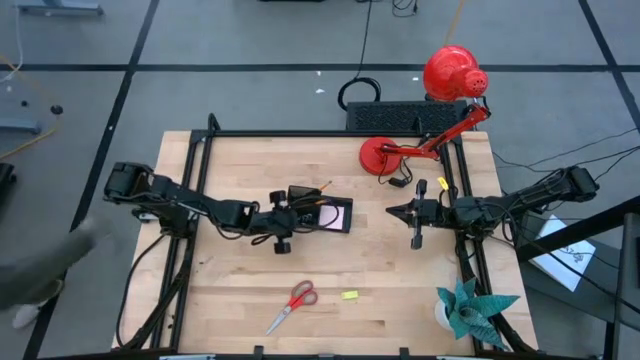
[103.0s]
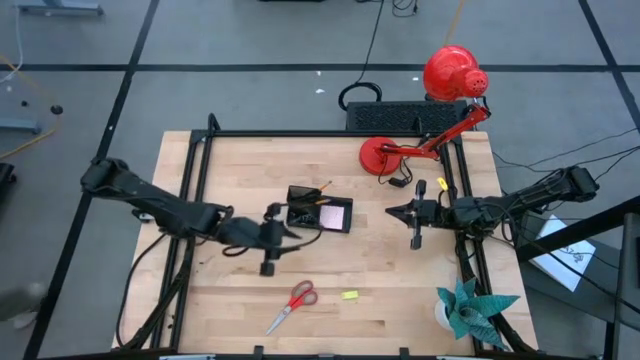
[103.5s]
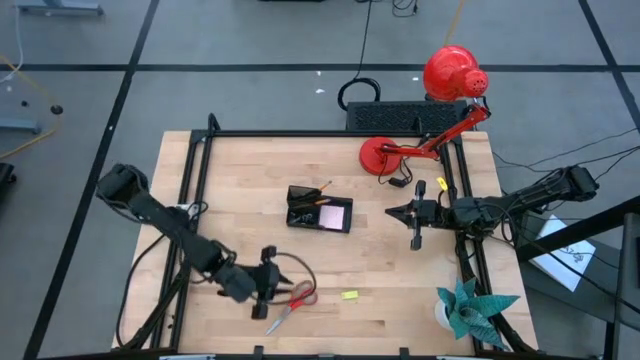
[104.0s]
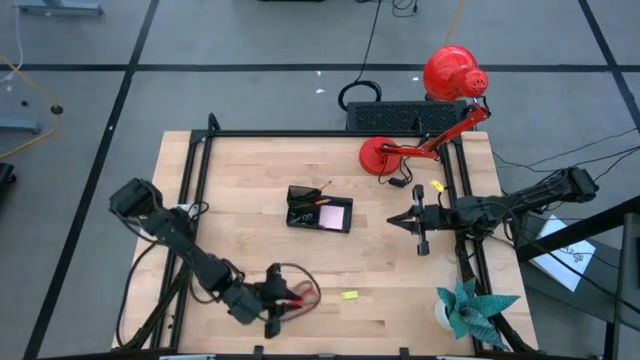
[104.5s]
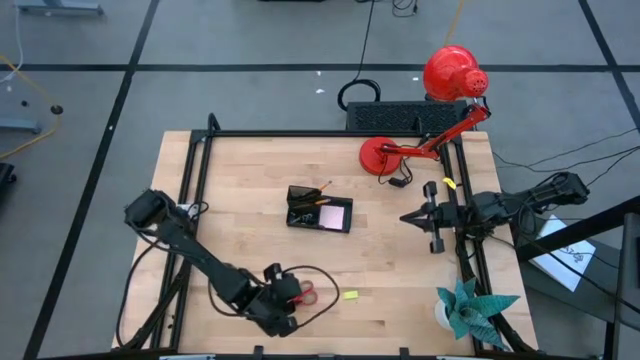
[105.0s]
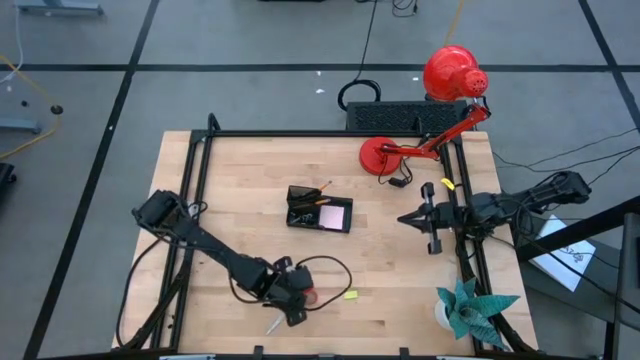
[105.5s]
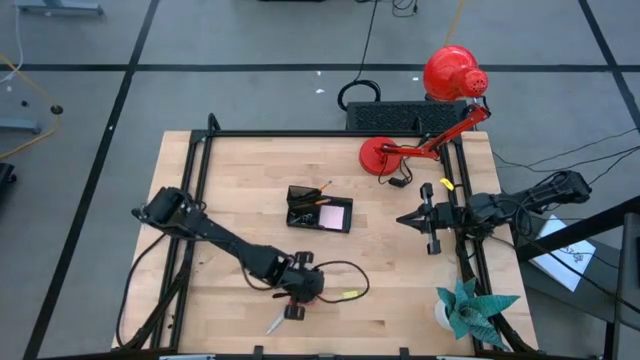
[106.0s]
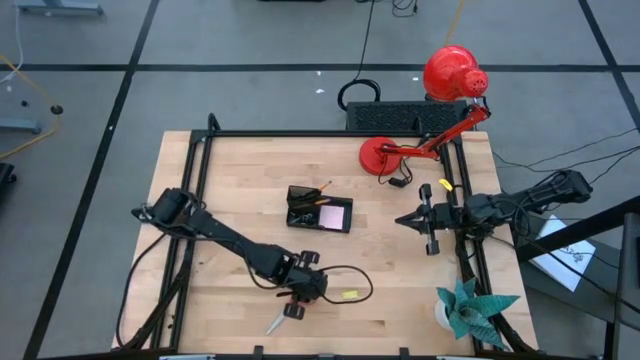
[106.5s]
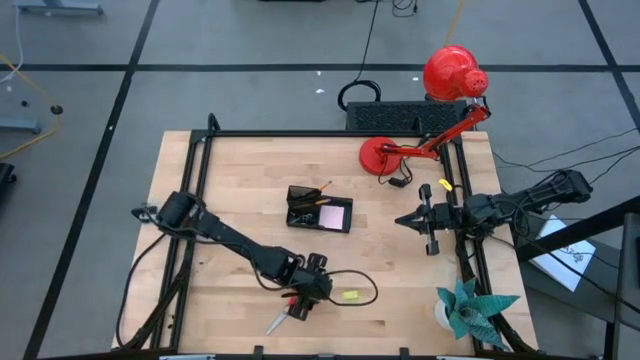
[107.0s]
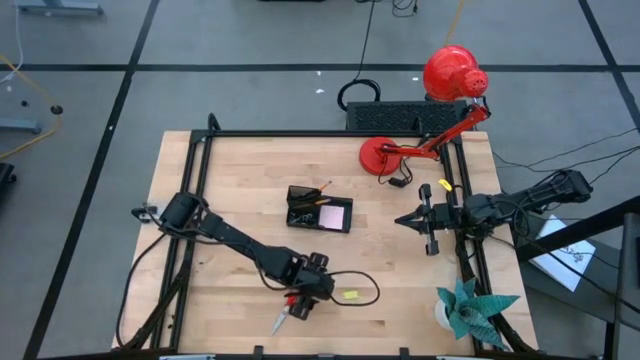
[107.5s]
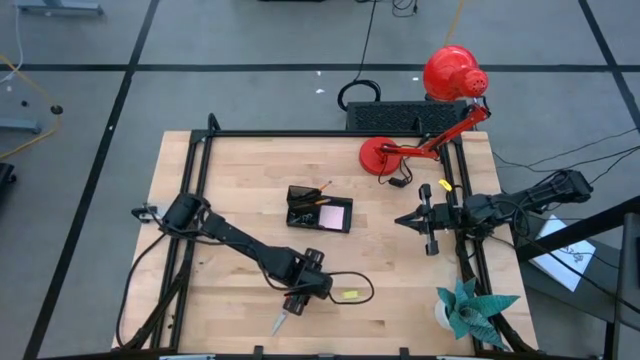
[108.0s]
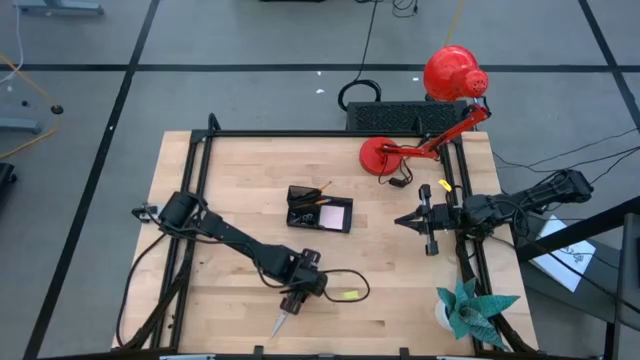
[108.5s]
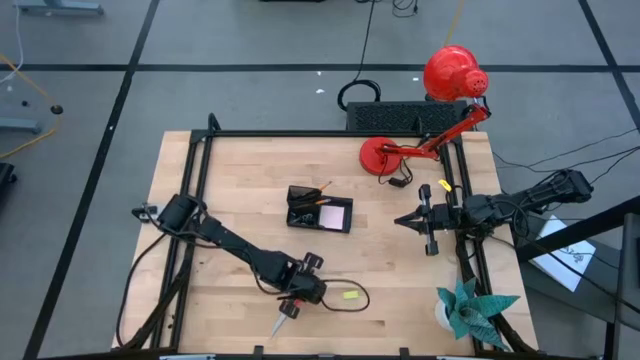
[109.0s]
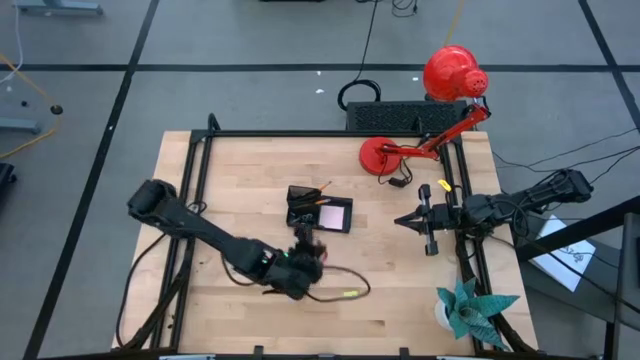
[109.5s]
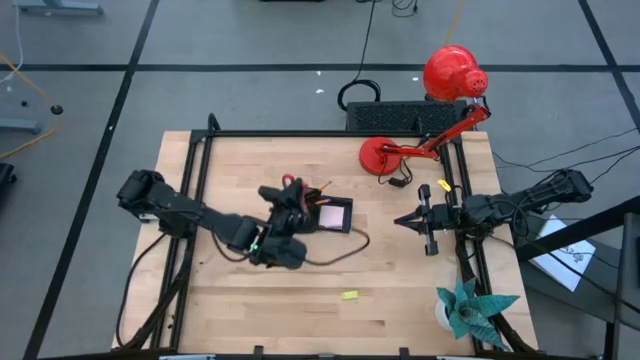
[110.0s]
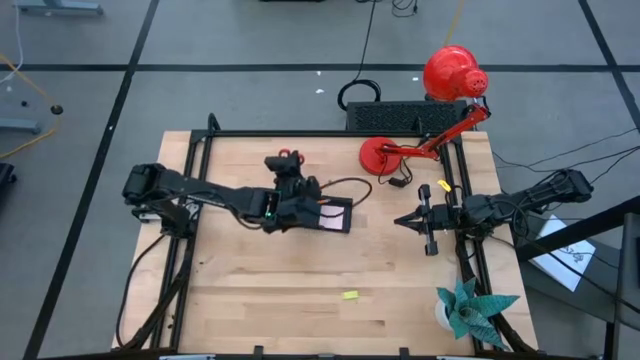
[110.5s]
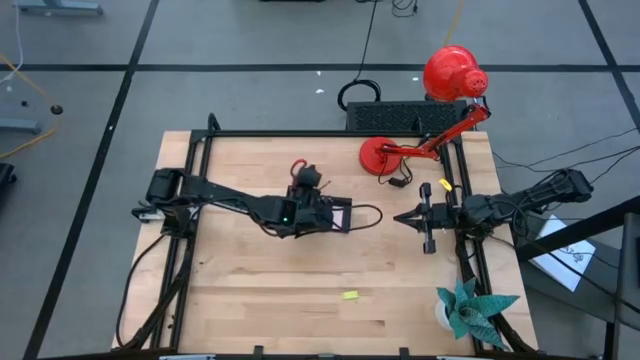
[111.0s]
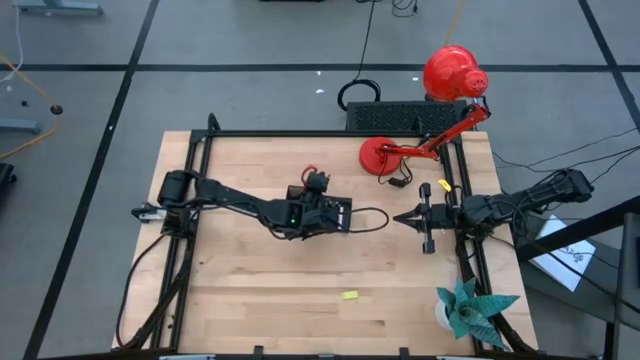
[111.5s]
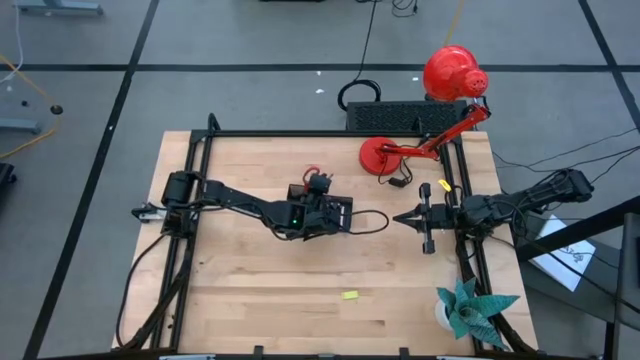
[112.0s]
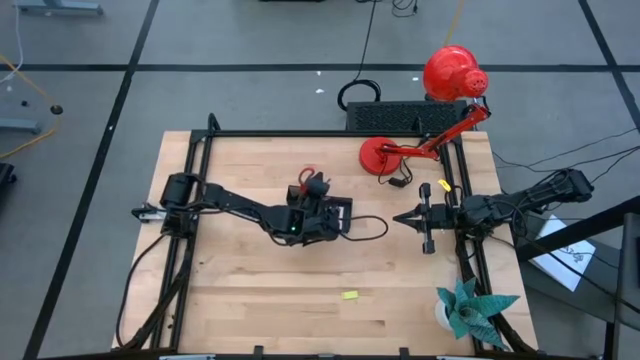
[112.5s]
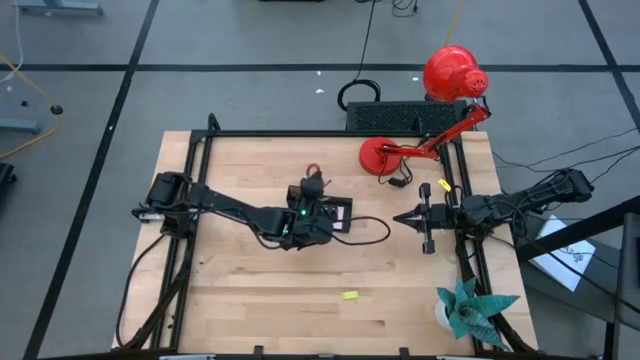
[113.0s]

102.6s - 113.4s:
Task: Pick and place office supplies into organizer
Put the red scissors into the black desk organizer

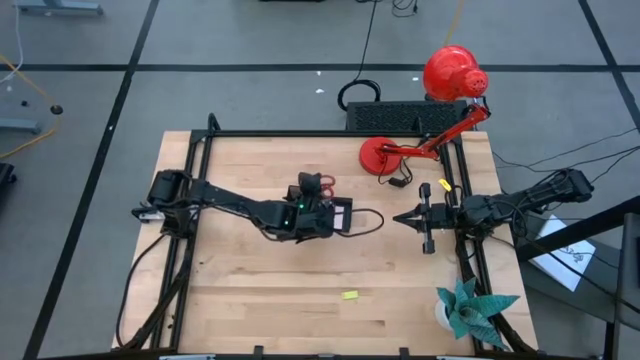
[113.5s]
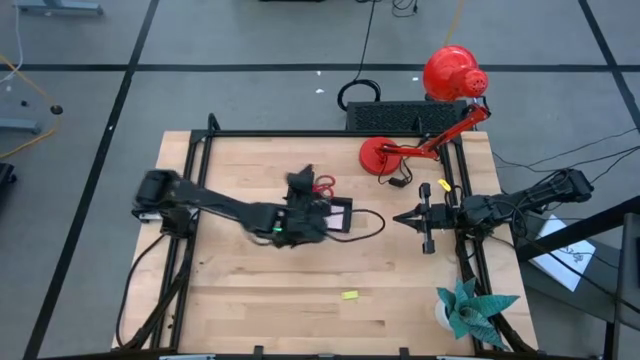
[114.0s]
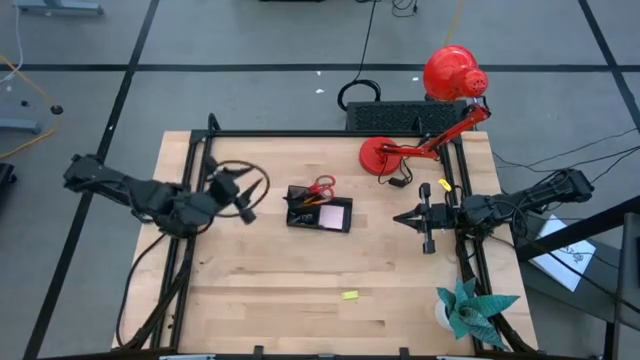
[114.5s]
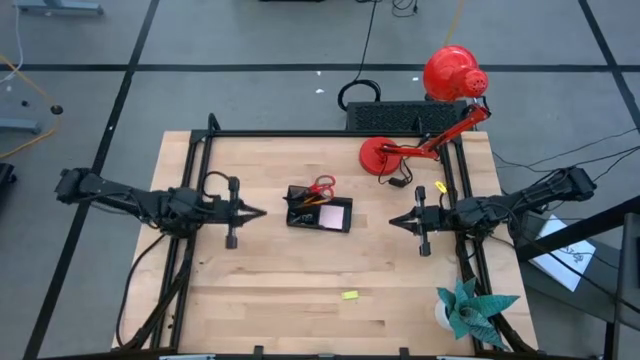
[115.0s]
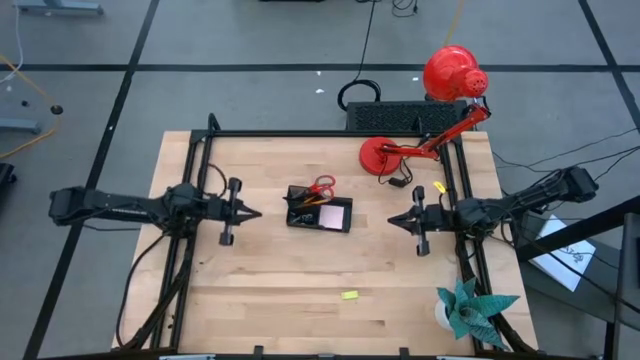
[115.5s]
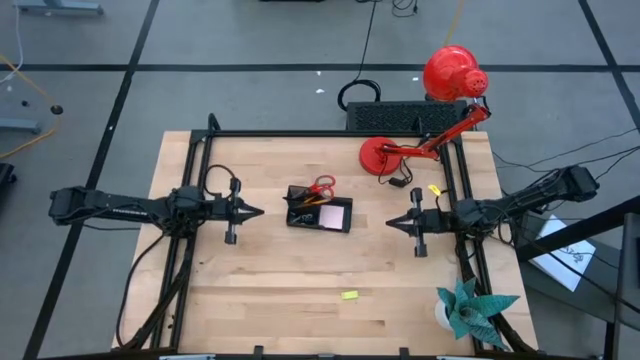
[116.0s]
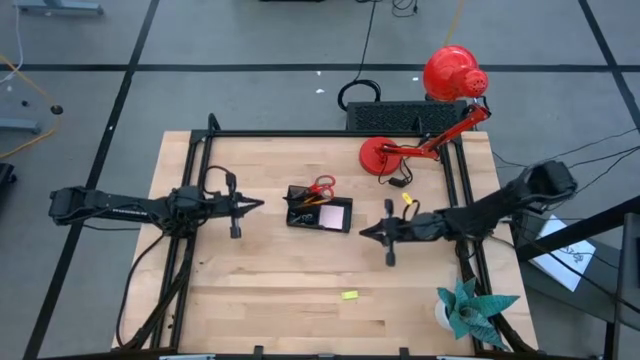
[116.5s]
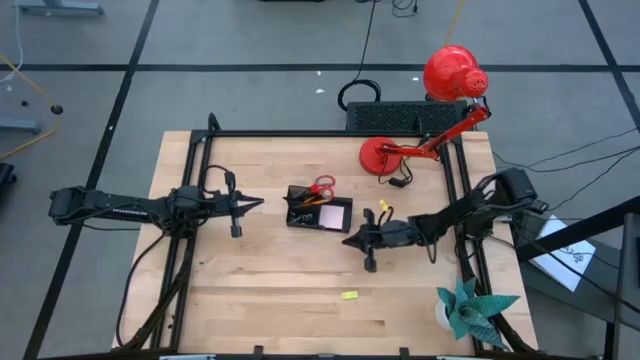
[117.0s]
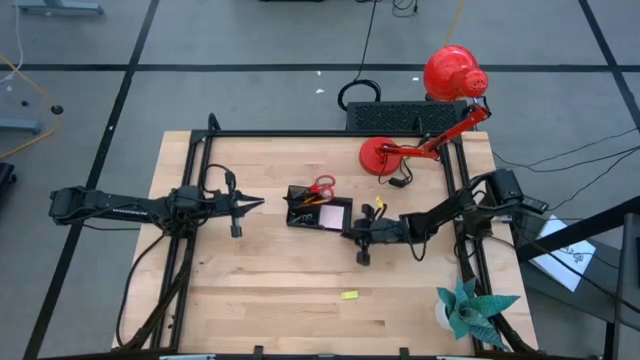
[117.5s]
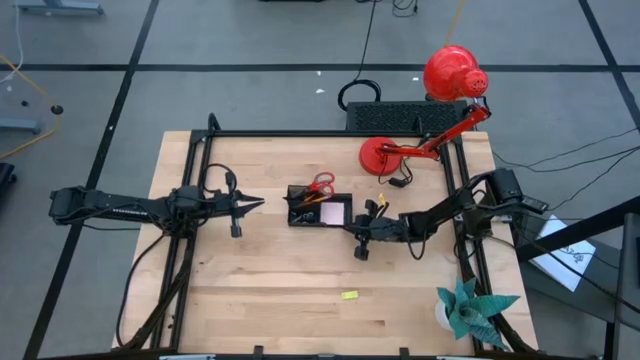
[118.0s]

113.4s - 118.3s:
Adjust the black desk organizer

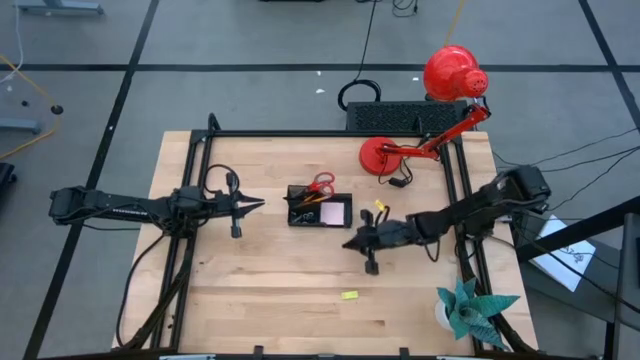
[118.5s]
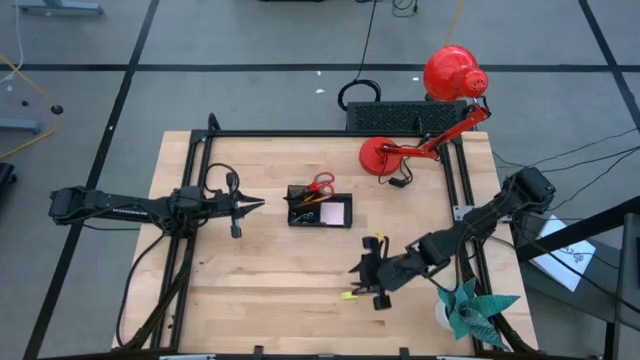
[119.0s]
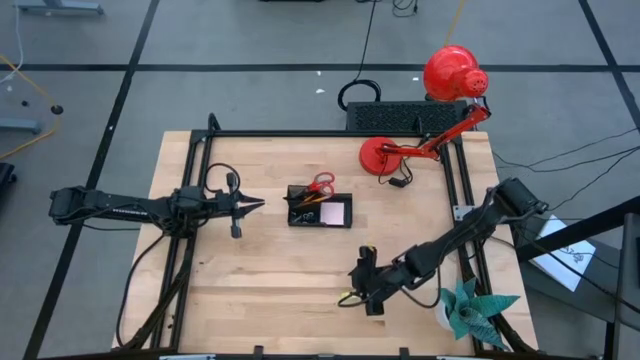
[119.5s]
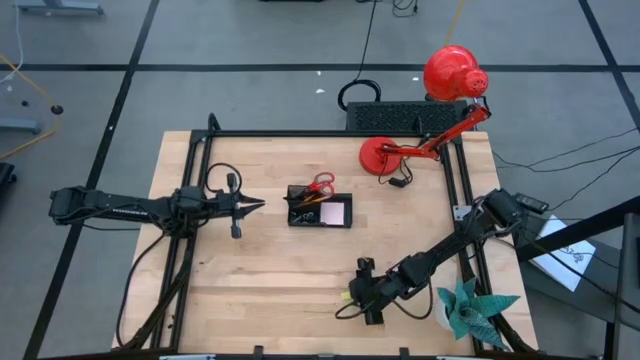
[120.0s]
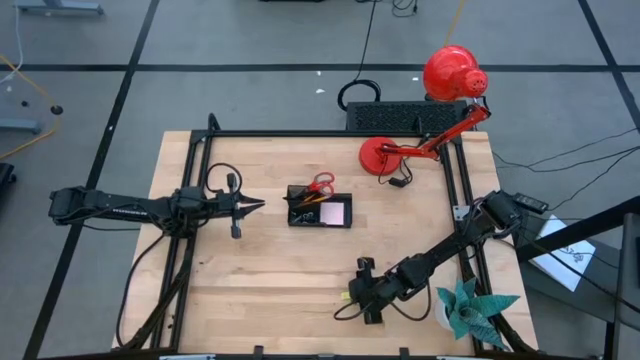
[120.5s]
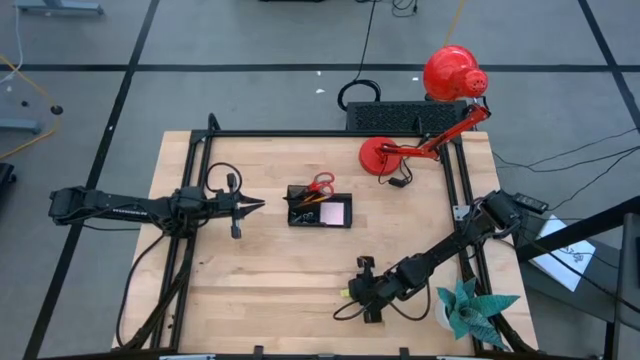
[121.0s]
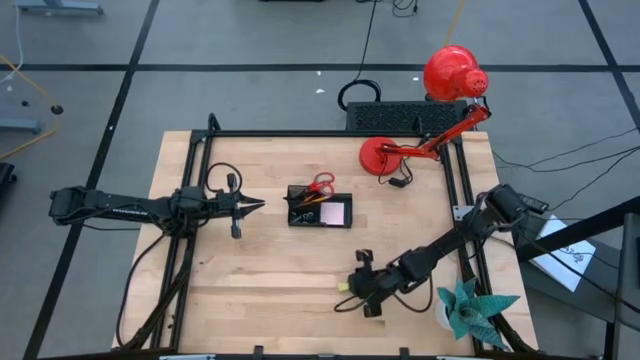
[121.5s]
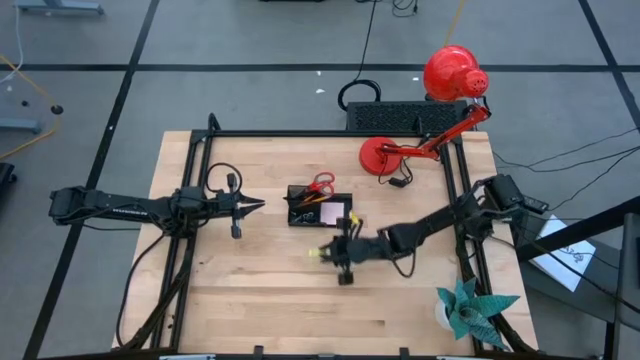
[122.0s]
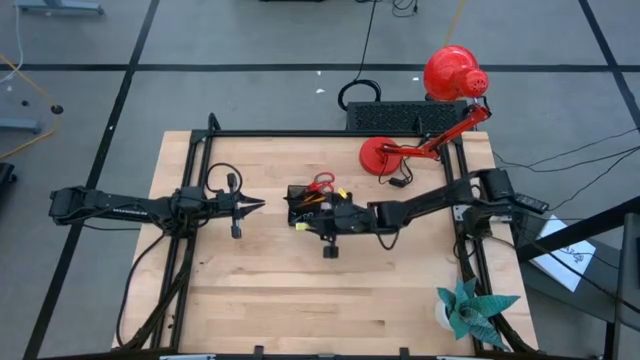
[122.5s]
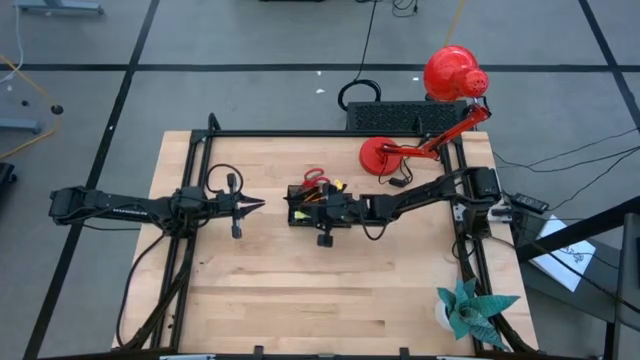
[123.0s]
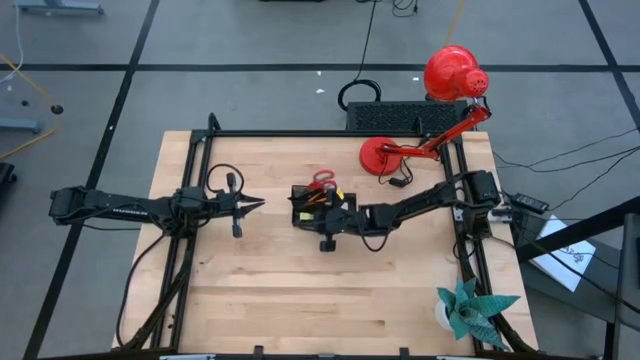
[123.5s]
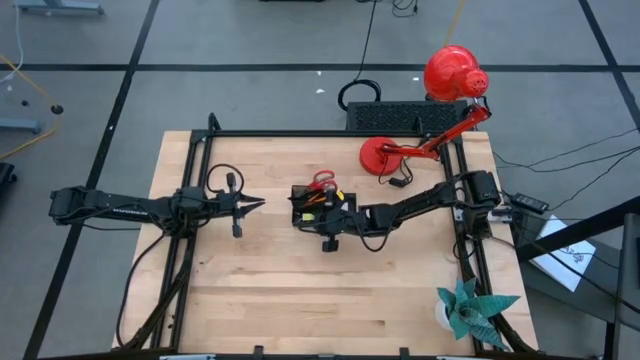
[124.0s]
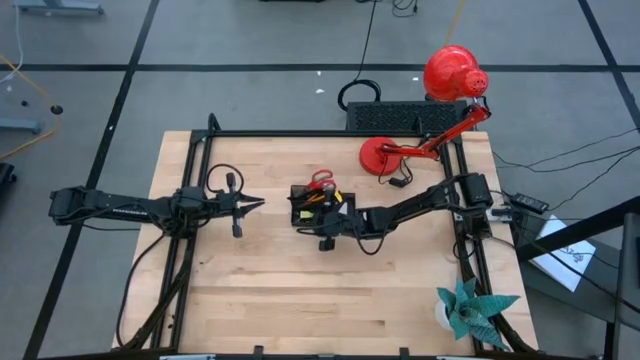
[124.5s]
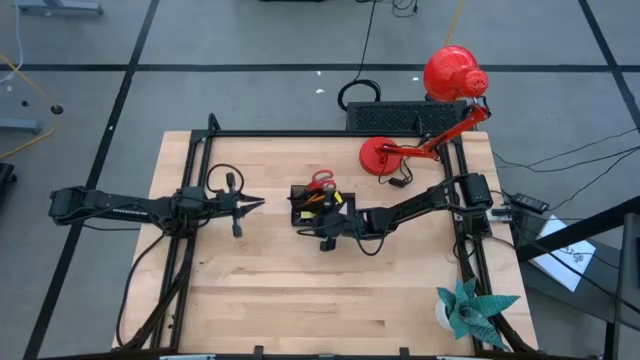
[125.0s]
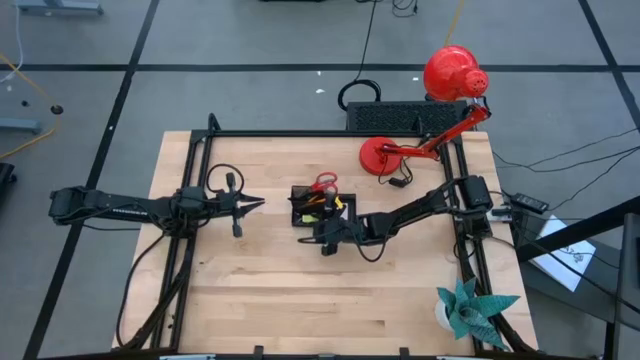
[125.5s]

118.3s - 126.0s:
Put the green eraser into the black desk organizer
